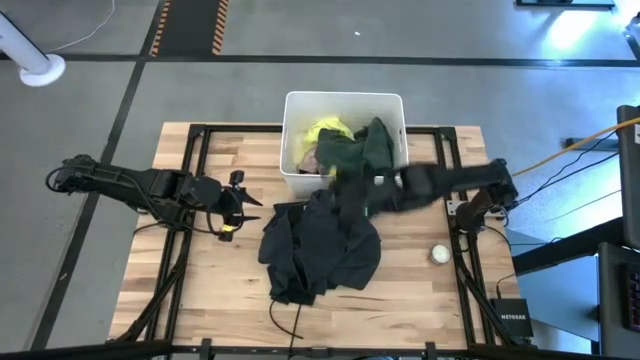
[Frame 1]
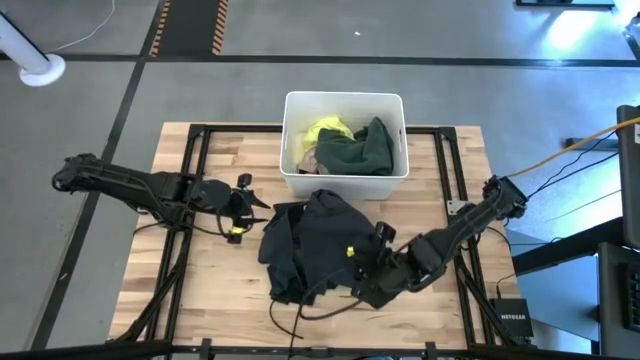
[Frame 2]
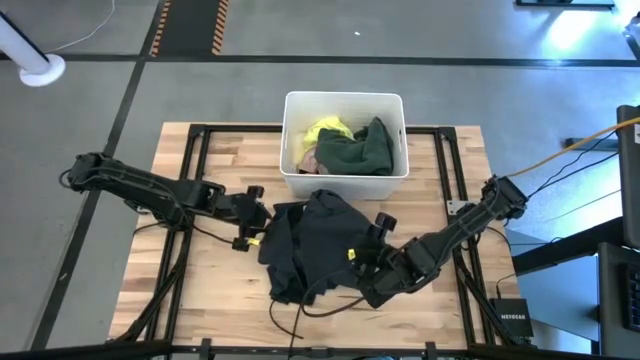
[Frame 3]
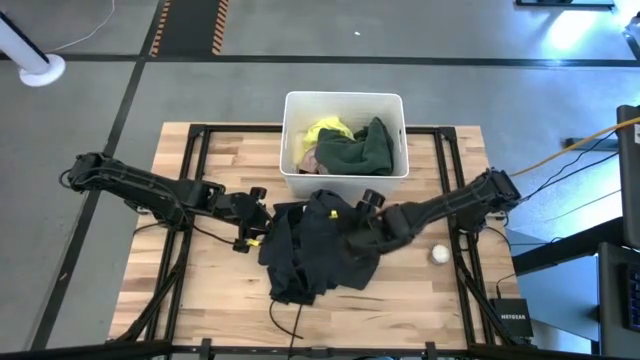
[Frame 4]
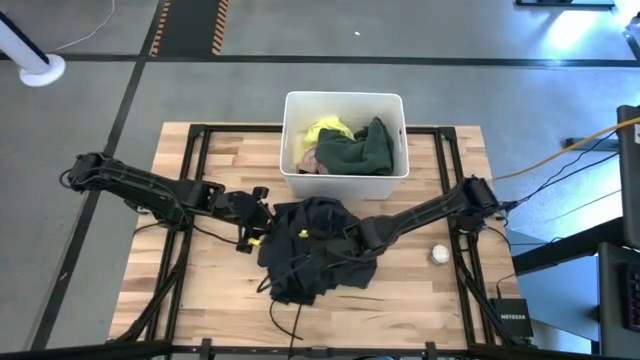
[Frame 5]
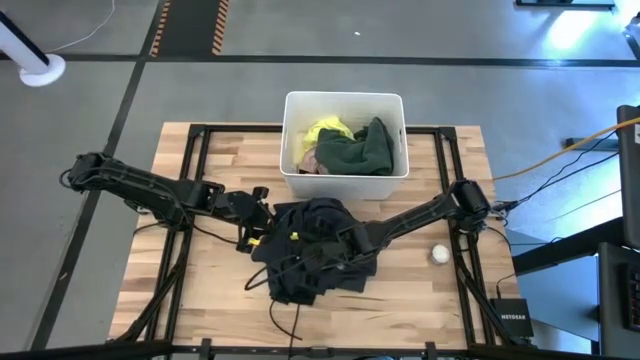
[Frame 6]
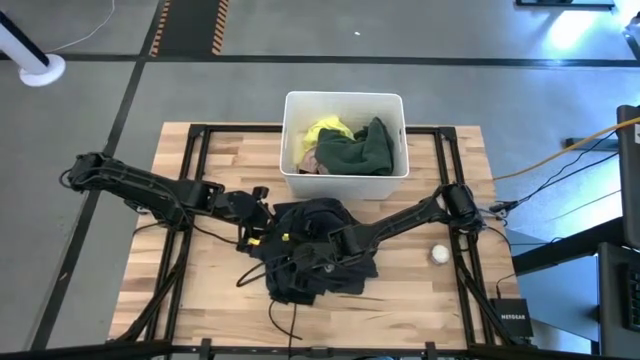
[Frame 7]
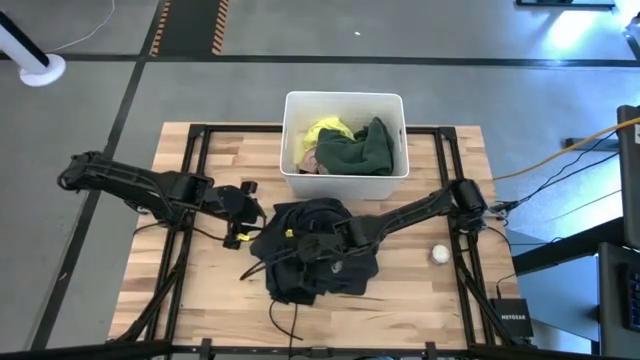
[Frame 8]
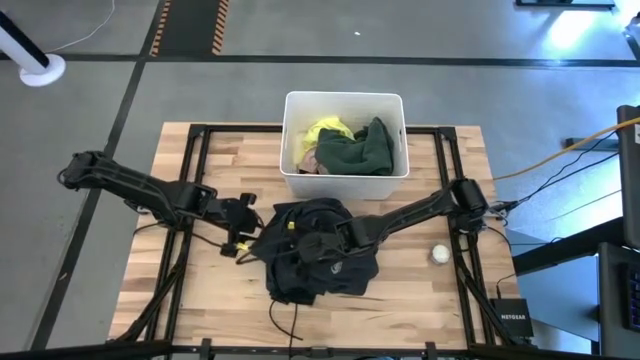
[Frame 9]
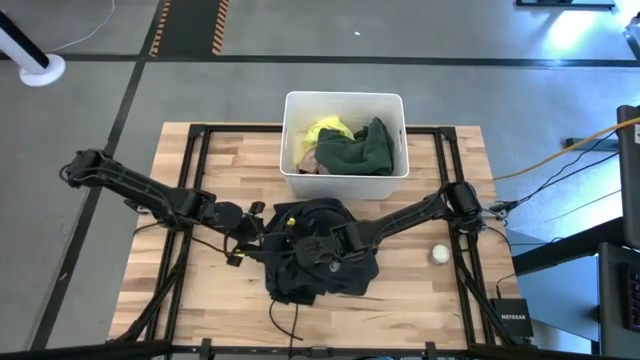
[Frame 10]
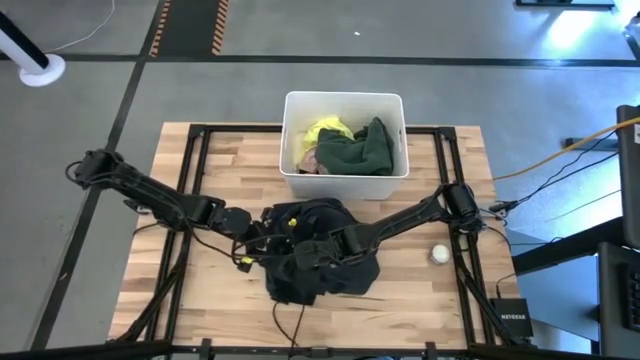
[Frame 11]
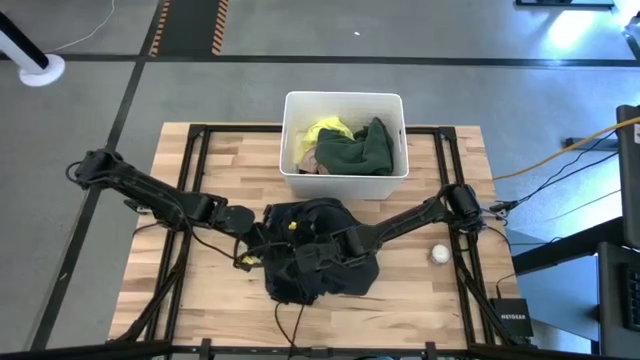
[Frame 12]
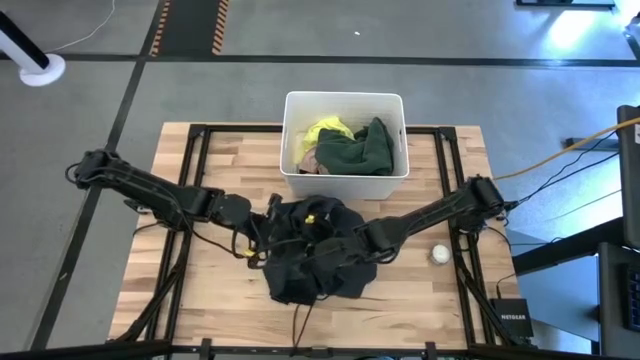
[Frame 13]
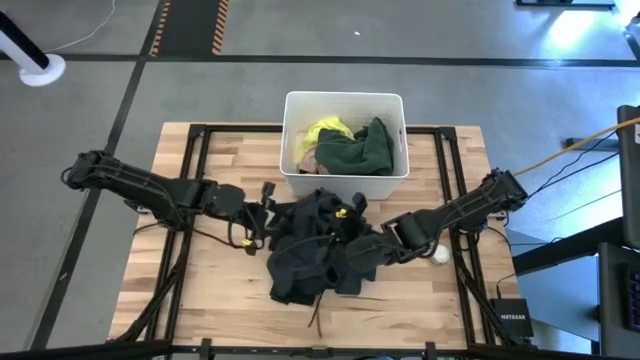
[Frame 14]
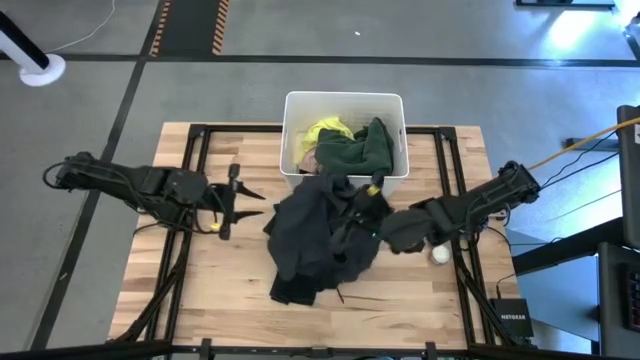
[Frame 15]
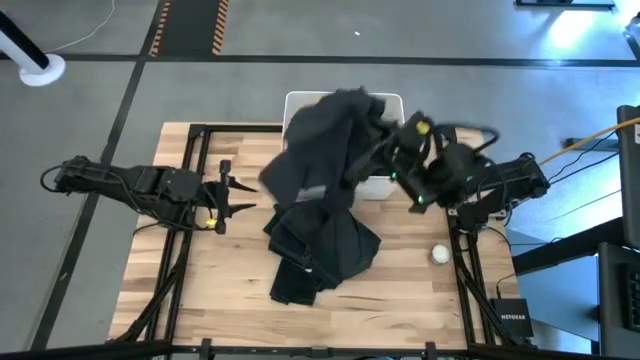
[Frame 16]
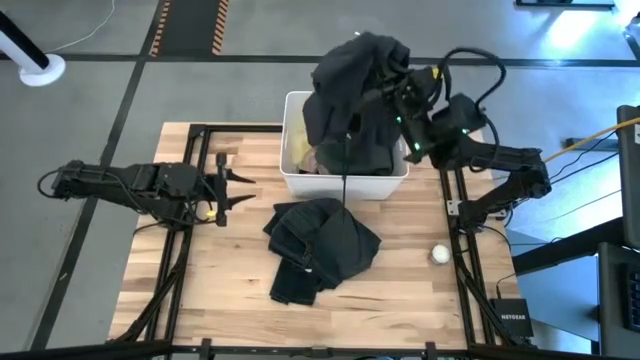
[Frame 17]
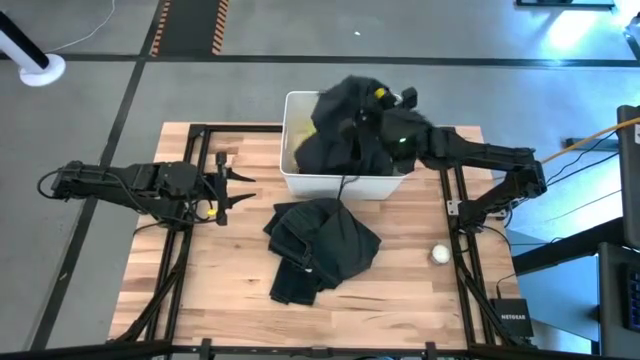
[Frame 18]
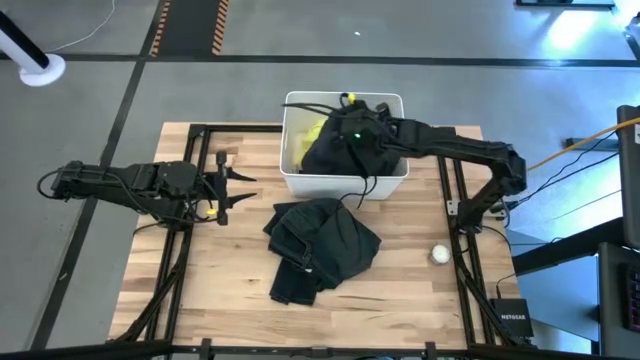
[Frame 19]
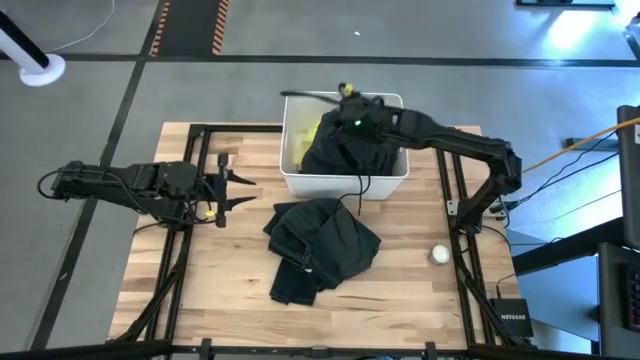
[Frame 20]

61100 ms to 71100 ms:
Task: Sort clothes
Put the dark blue shorts into the white bin

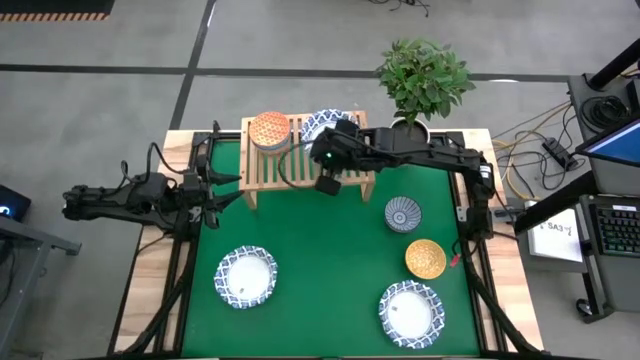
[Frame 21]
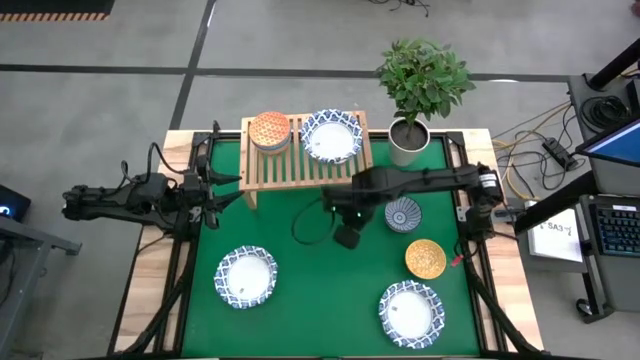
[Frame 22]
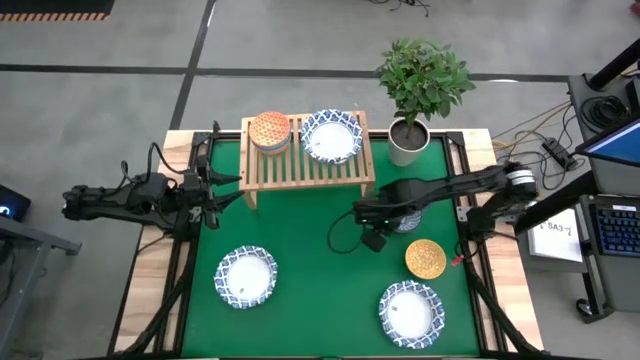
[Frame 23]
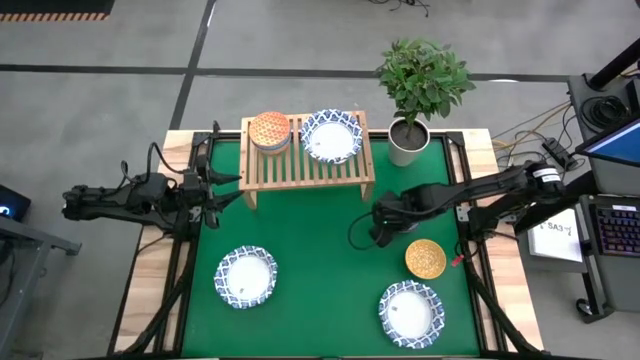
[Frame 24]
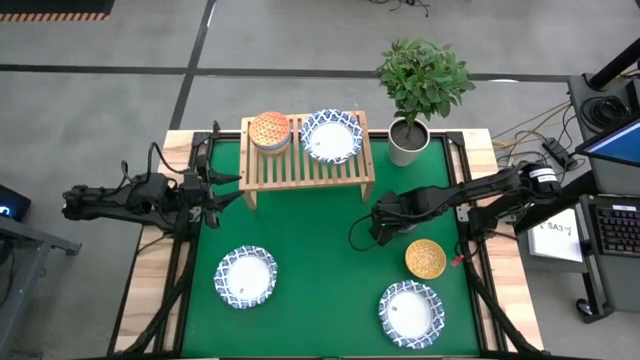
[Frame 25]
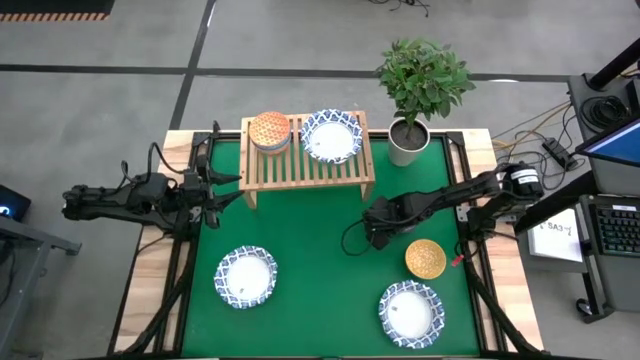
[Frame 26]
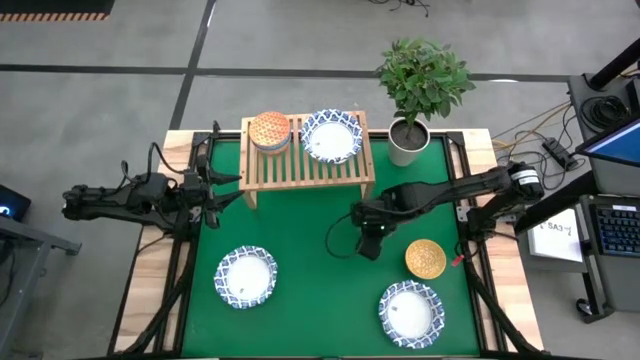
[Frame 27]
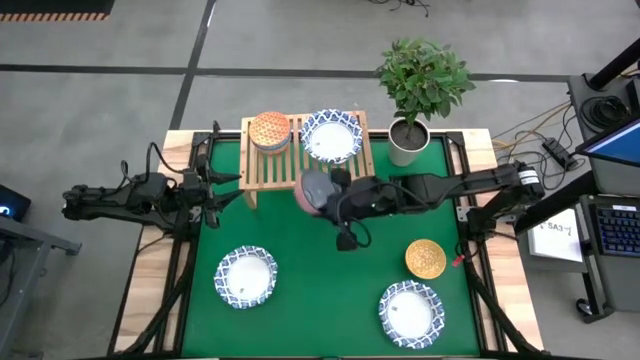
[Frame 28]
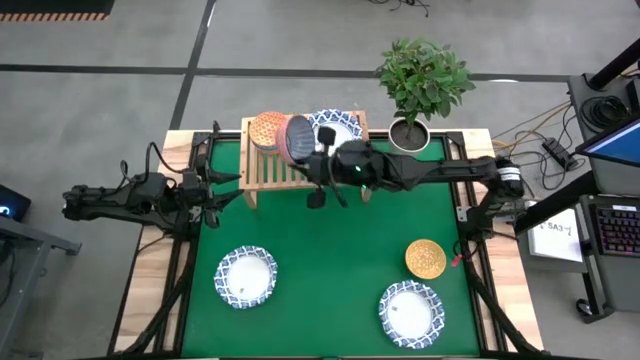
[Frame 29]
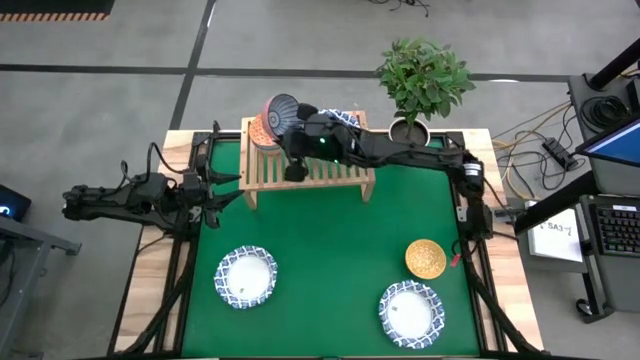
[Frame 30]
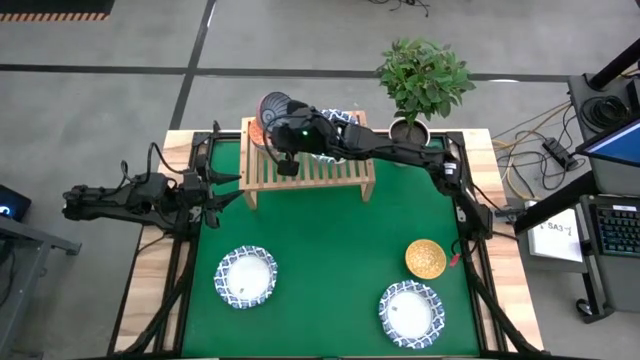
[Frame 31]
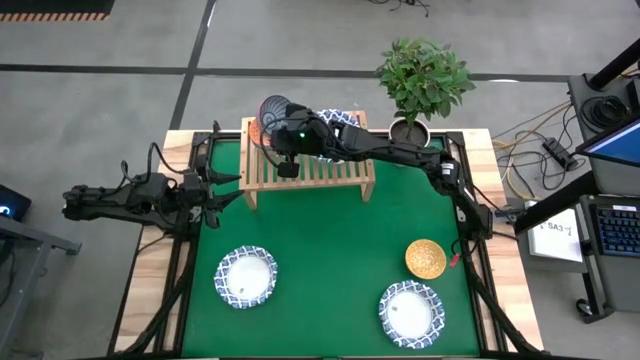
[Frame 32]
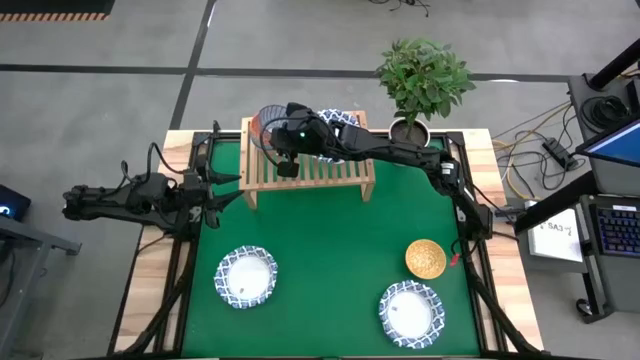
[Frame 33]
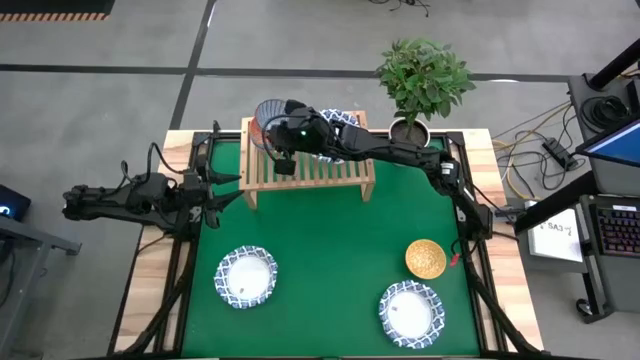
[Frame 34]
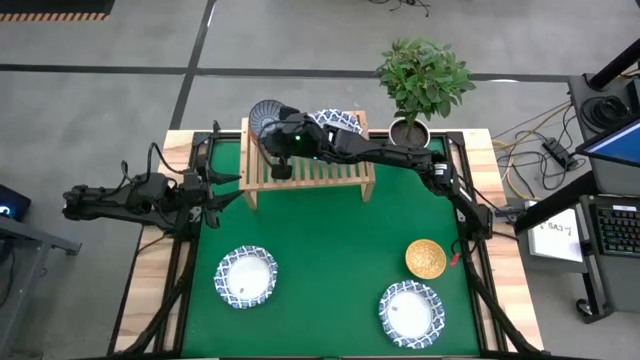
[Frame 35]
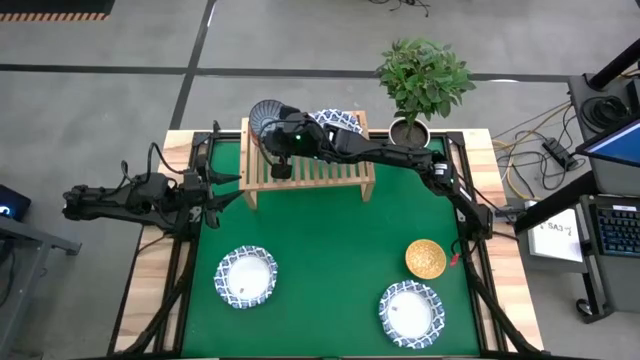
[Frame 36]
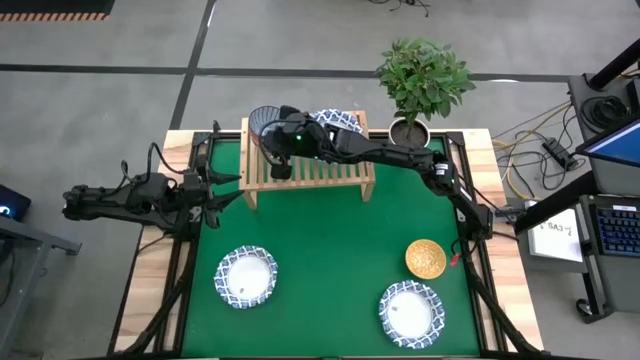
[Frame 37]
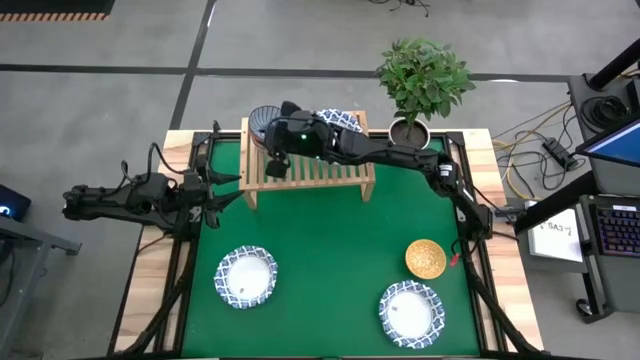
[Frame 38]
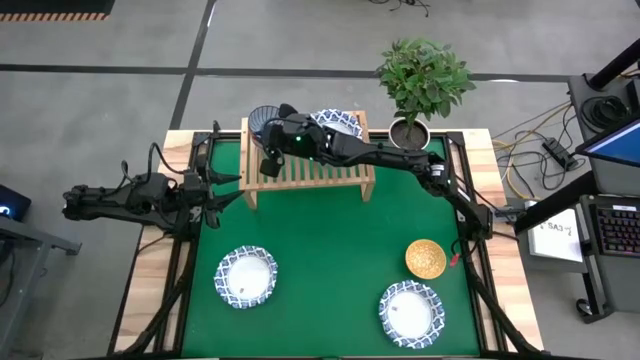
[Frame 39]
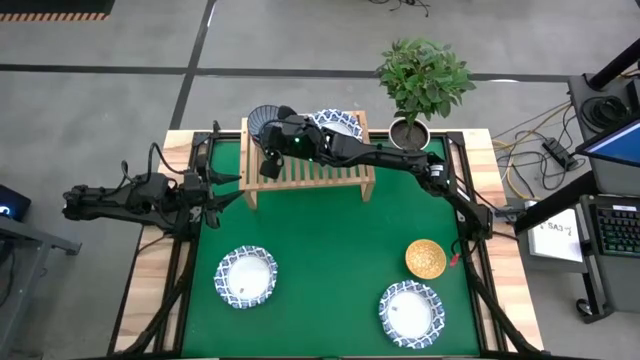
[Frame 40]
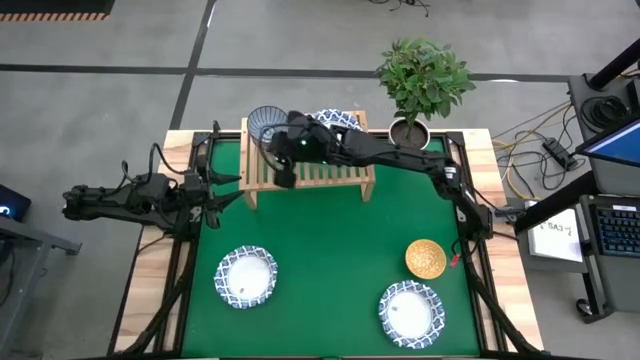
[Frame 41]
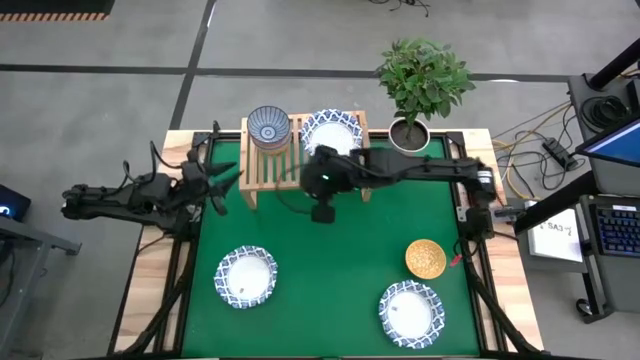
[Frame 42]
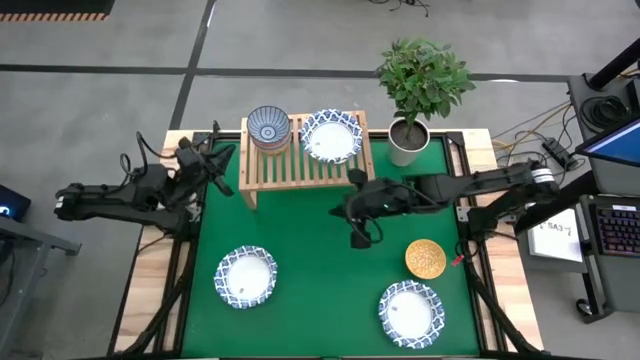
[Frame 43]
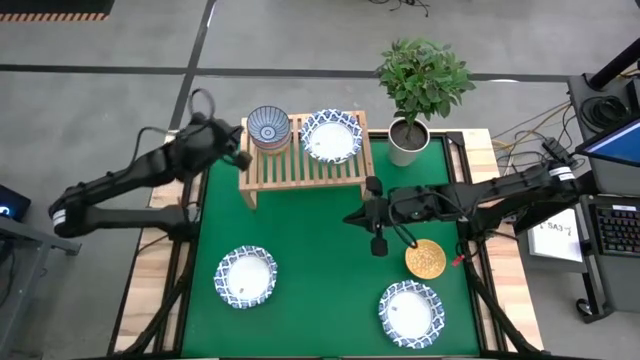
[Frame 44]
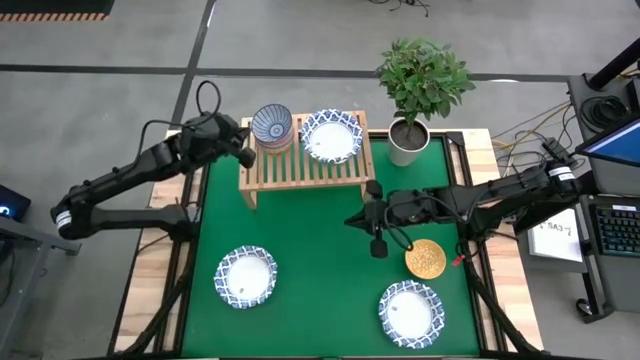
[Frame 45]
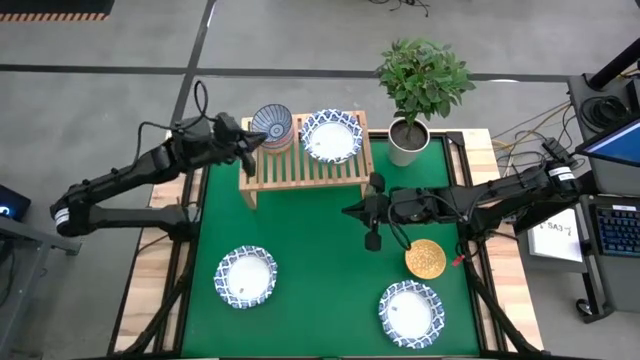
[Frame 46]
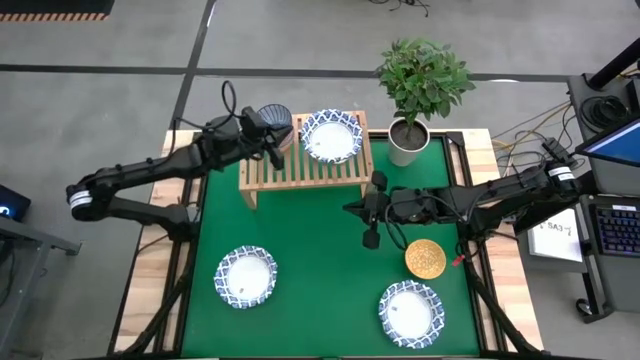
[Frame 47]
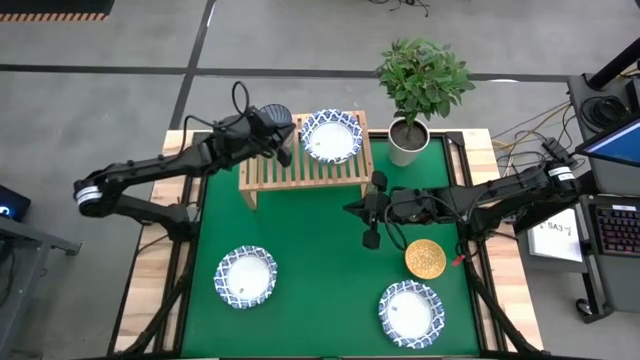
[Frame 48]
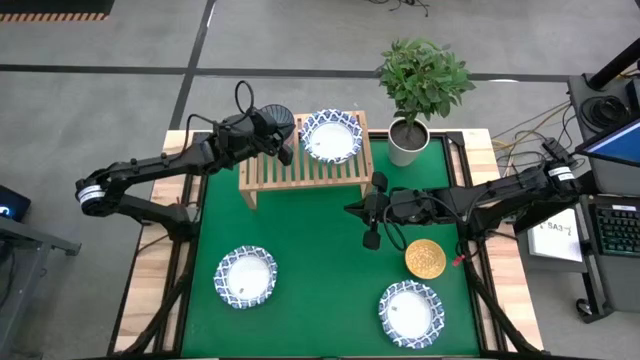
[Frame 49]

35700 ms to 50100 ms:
Task: Place and stack bowls onto a shelf
Stack the dark blue bowl on top of the orange bowl on the shelf
